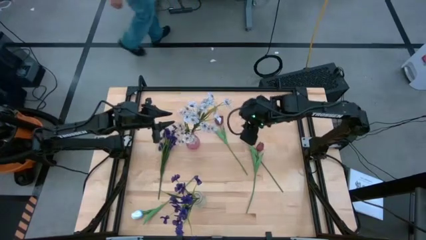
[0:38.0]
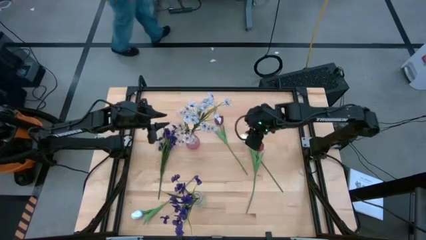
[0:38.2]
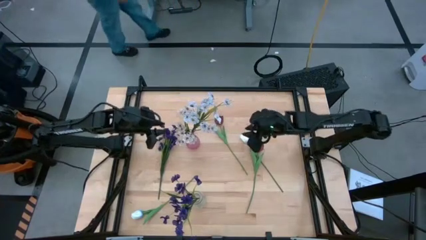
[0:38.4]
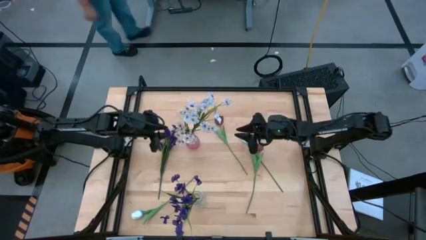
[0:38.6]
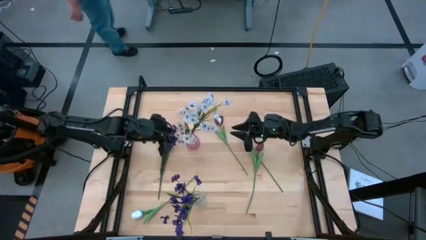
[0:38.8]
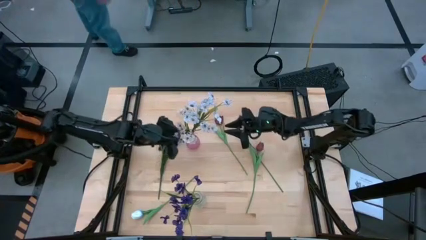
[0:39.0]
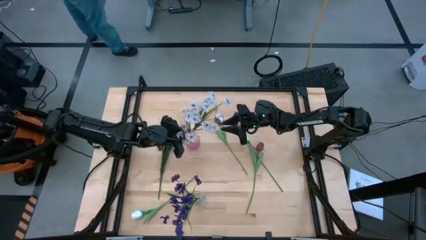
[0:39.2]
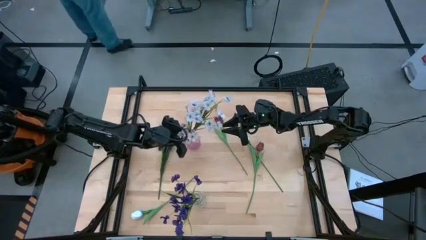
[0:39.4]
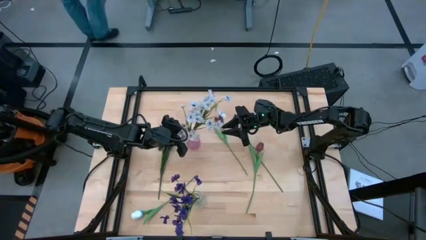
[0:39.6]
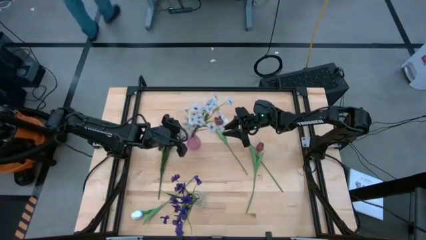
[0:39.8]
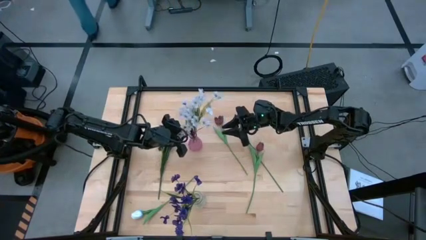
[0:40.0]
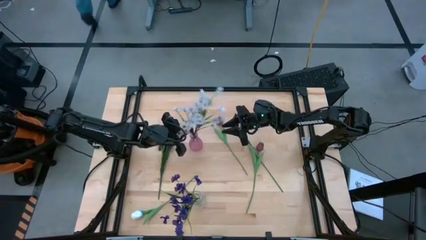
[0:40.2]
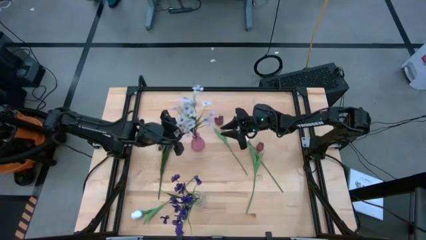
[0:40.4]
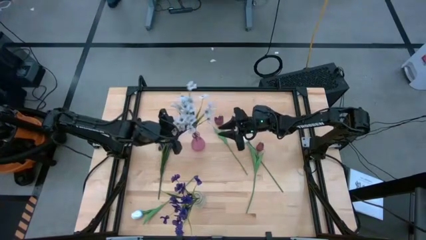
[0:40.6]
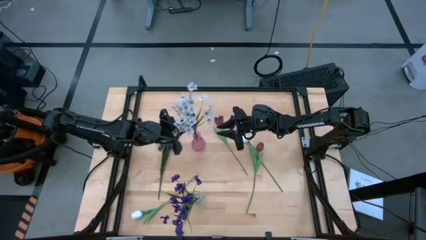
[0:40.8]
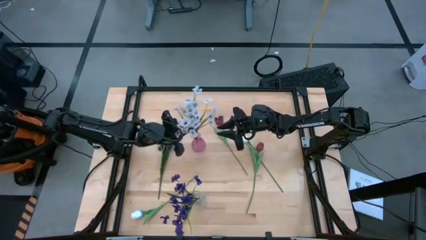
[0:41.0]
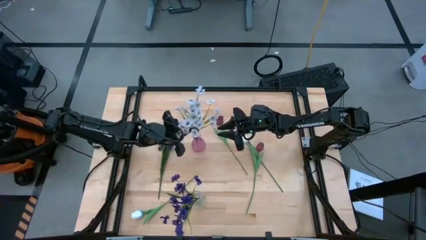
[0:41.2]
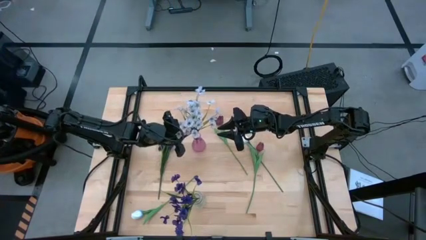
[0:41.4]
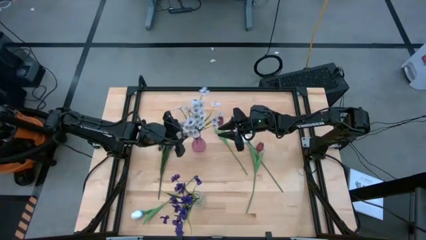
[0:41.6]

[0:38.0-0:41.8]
Task: Sort flowers into vase by color
Adjust the white flowers

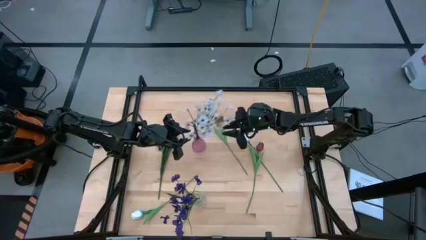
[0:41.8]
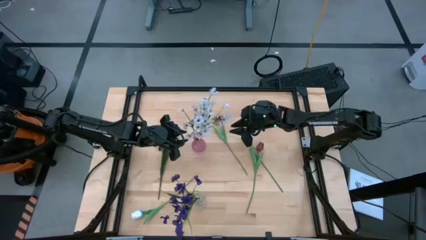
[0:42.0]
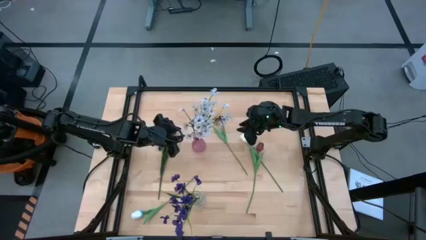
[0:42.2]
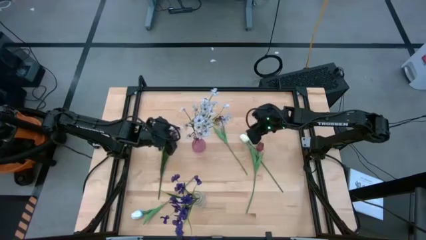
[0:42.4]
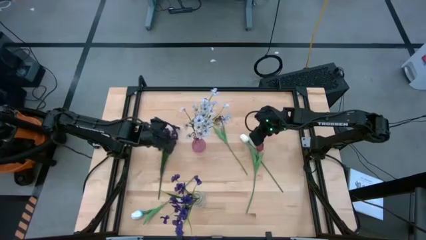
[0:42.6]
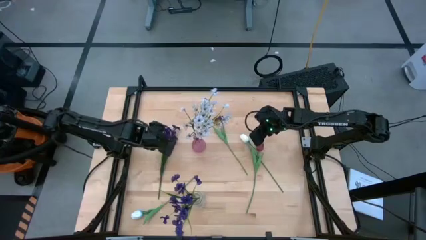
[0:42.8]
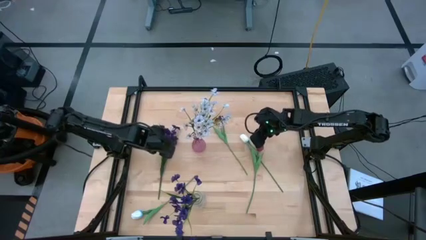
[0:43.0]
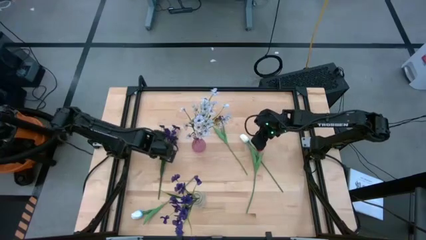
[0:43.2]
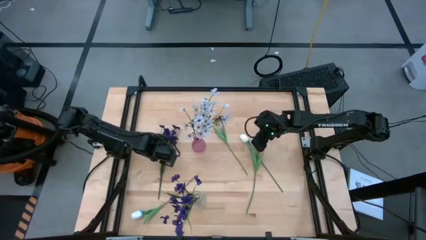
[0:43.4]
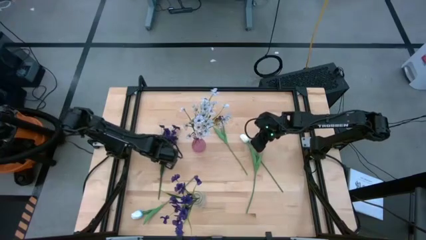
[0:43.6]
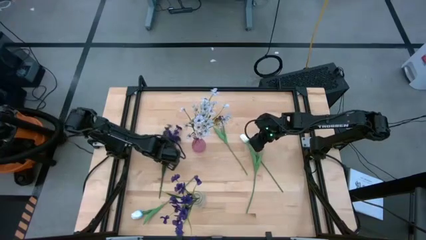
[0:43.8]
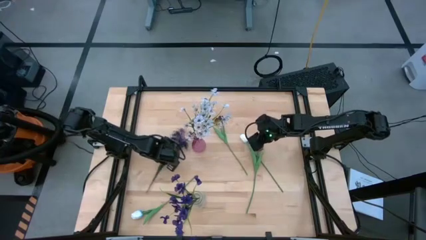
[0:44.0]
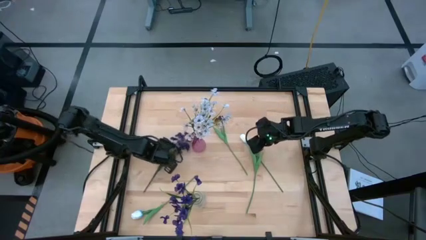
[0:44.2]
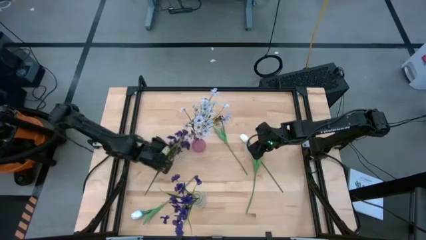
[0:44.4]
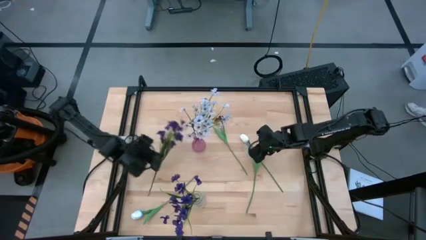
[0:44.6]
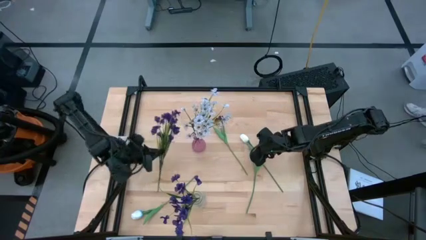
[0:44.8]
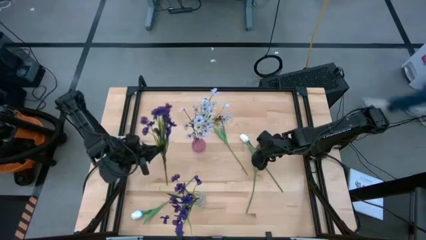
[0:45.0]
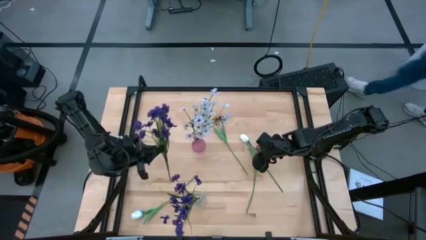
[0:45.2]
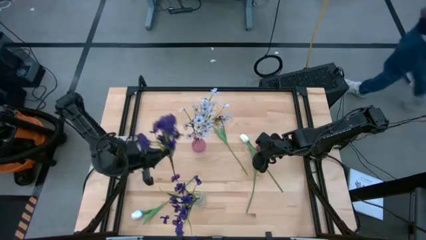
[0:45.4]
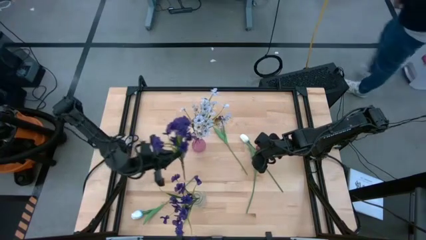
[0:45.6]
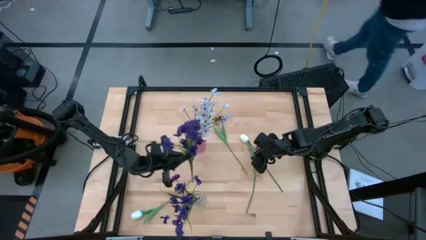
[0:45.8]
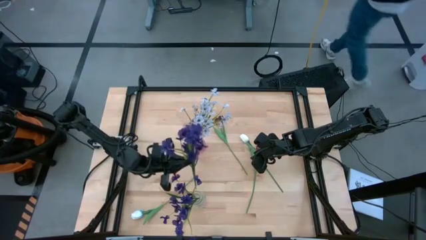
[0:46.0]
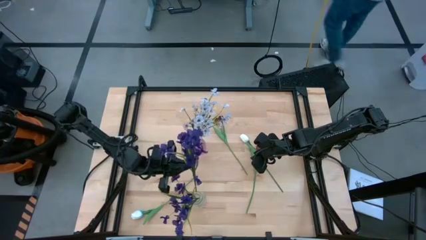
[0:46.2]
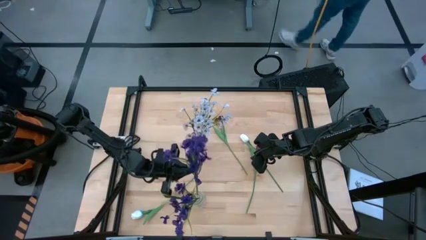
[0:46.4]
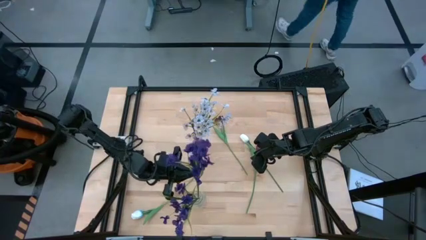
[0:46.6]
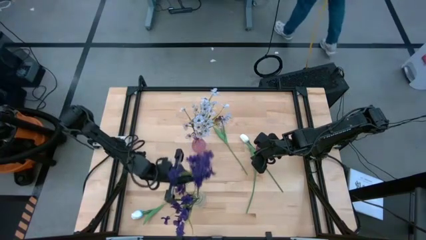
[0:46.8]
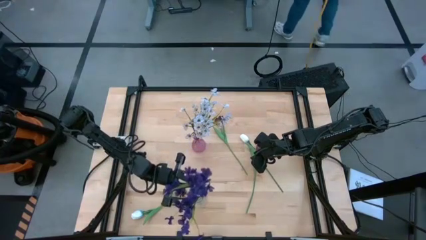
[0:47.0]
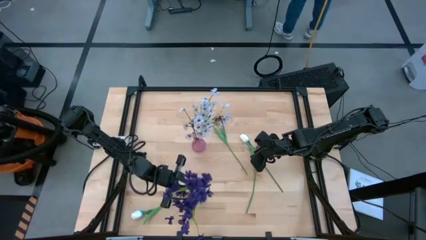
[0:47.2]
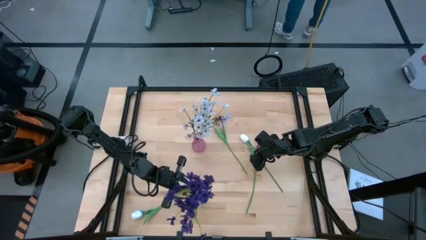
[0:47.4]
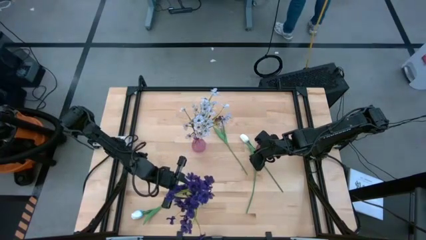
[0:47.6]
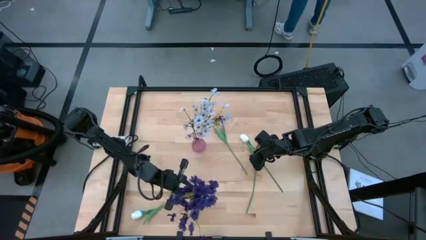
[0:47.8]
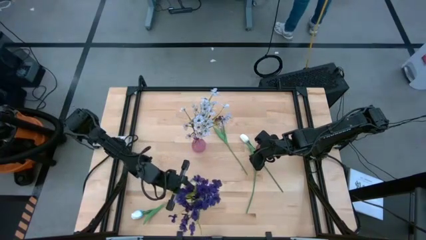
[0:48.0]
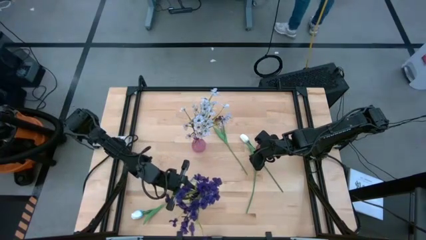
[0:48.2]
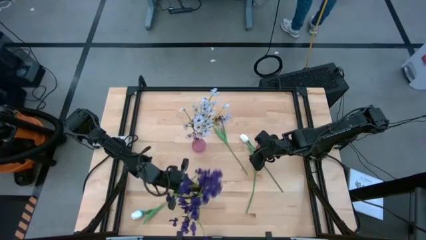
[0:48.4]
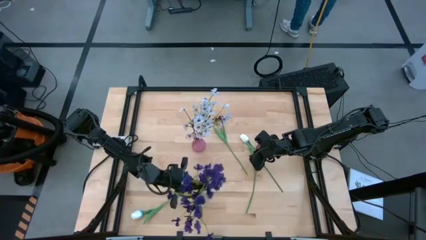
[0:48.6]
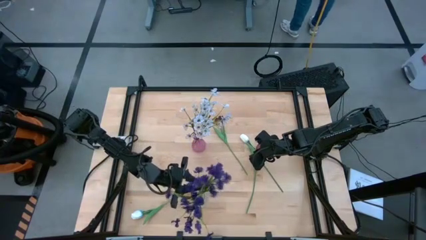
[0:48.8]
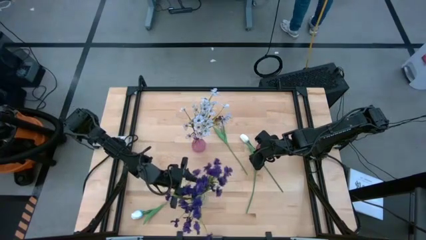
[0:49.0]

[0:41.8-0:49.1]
Put the purple flowers into the transparent vase

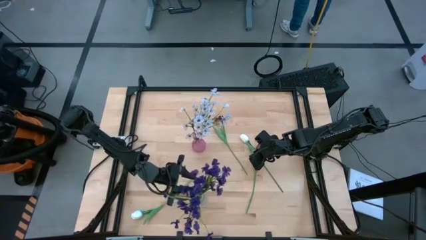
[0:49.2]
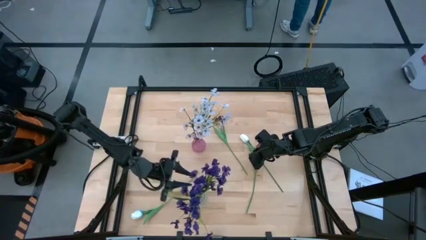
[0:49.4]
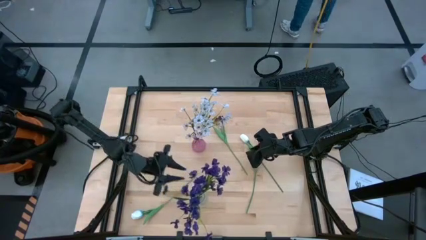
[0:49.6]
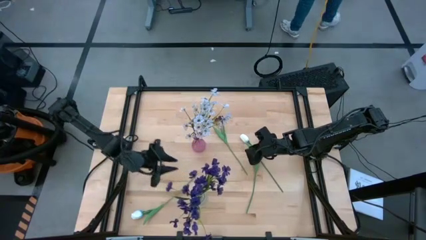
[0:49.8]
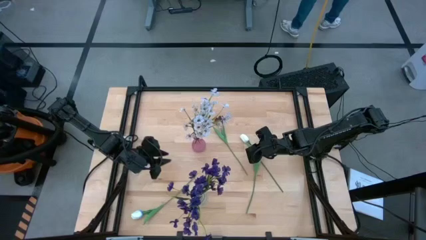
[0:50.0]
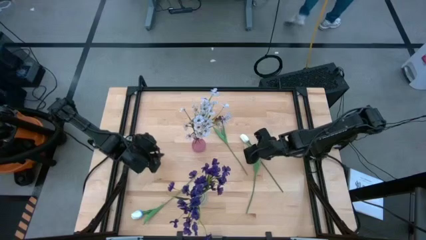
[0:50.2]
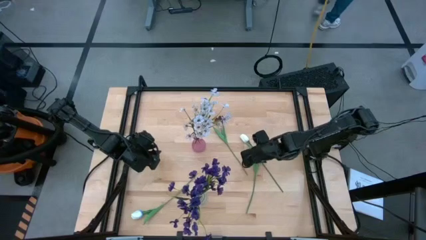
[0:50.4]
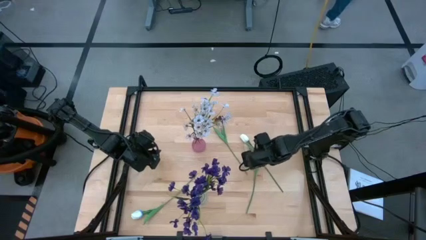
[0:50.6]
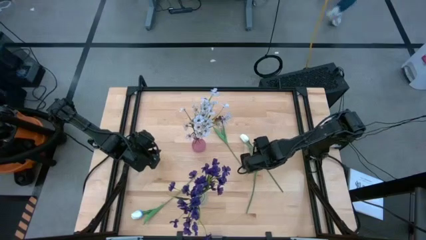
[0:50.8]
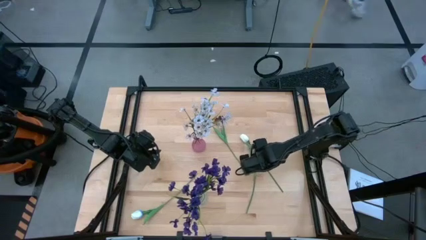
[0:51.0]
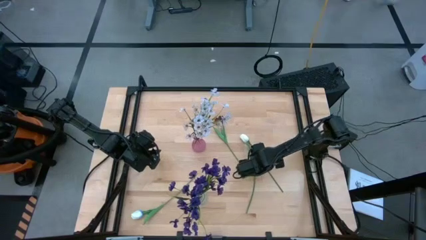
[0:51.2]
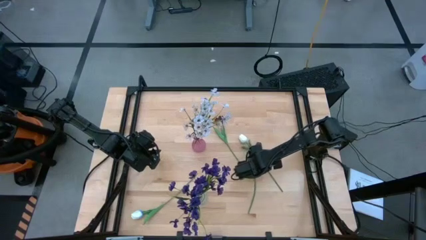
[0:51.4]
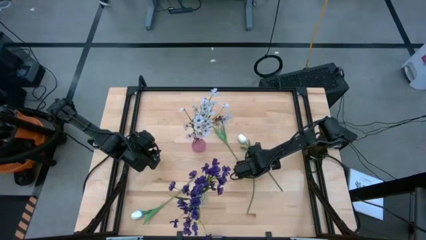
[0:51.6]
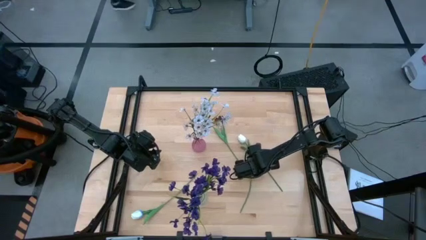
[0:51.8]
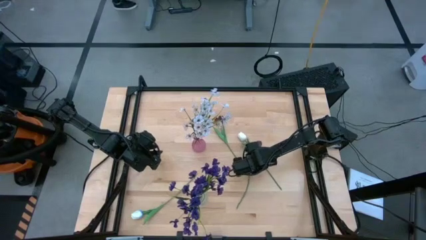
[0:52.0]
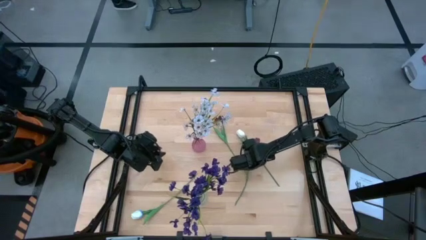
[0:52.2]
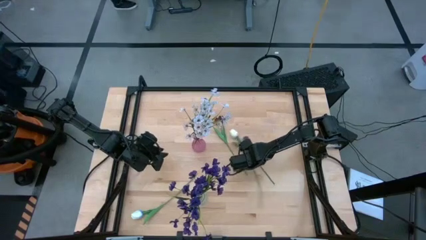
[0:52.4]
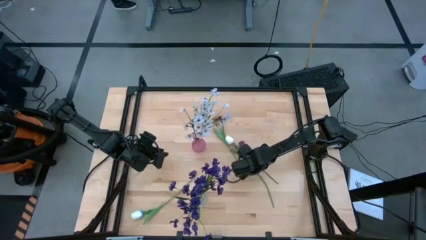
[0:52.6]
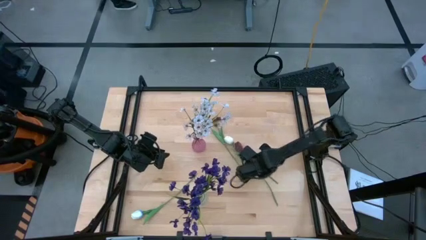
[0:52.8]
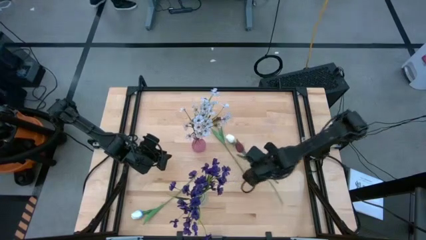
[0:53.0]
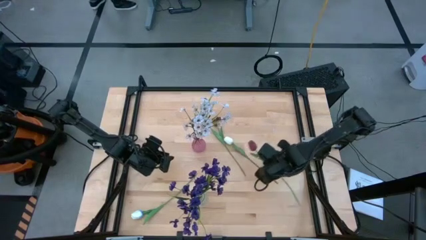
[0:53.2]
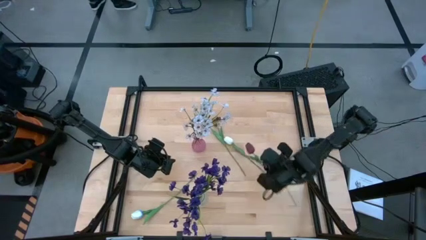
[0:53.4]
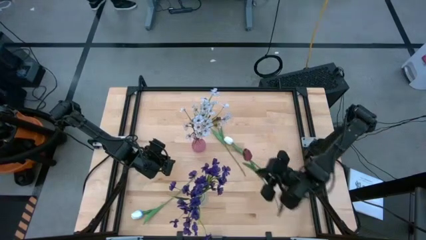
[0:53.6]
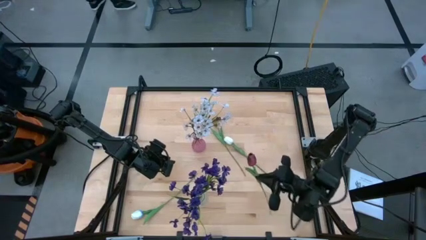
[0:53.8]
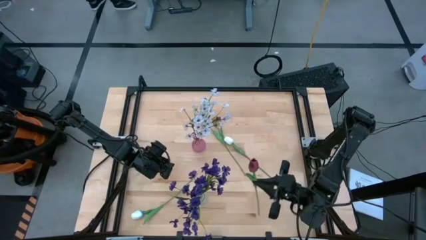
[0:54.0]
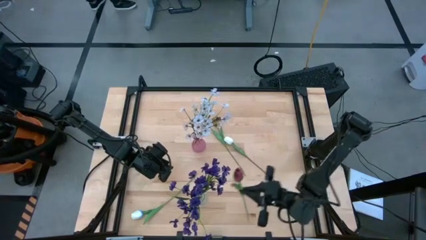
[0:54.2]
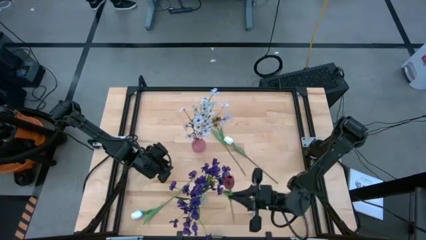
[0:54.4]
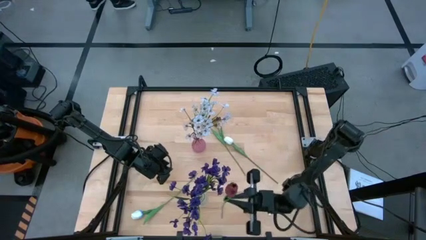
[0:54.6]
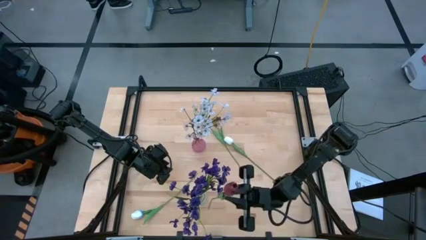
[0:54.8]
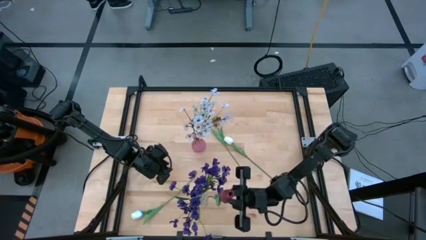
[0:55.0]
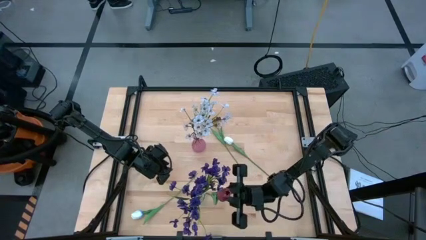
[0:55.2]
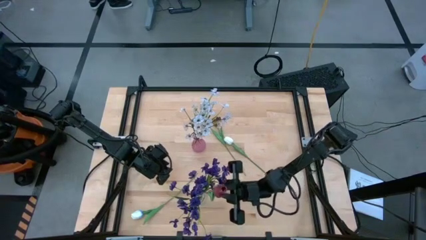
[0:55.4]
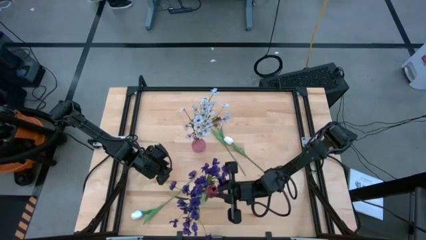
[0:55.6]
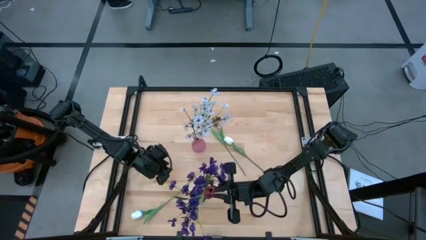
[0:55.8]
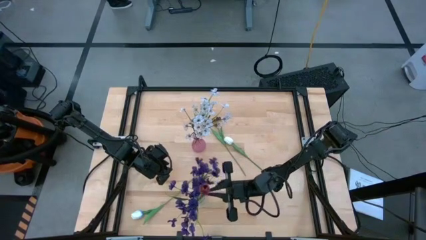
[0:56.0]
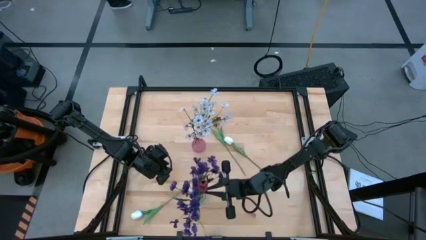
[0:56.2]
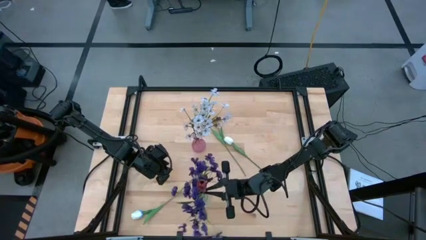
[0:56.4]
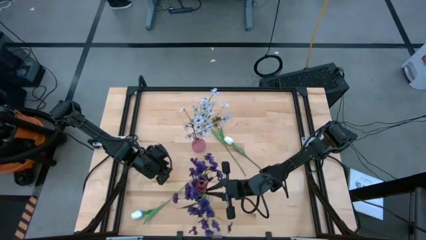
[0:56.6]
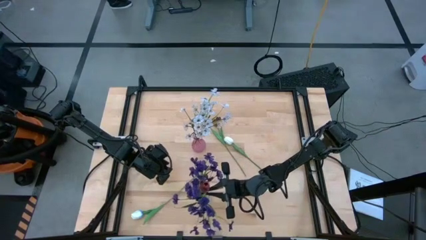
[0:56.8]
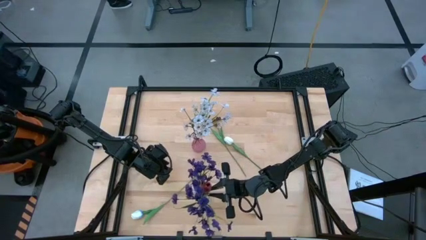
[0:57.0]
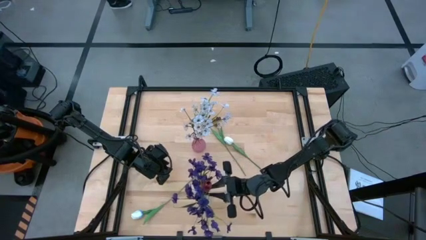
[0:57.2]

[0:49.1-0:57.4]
Put the bottom red flower into the transparent vase
